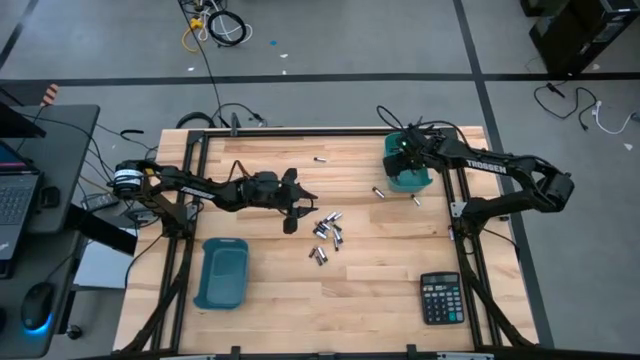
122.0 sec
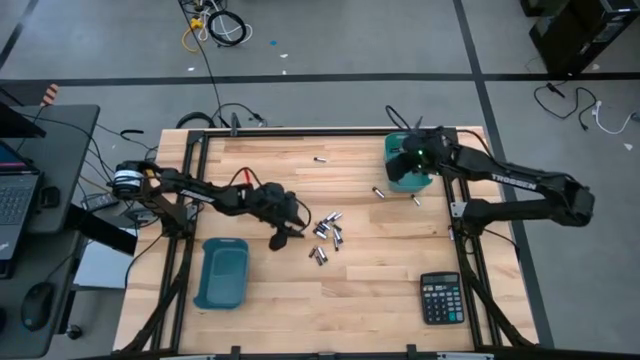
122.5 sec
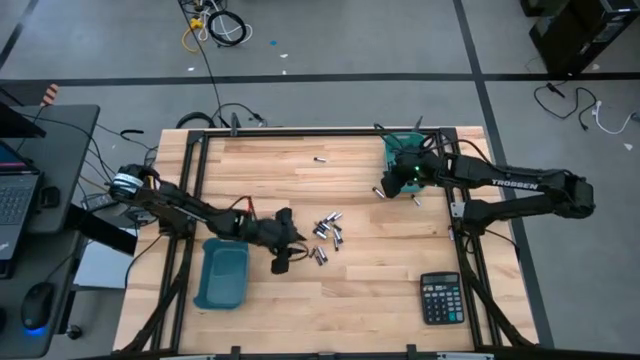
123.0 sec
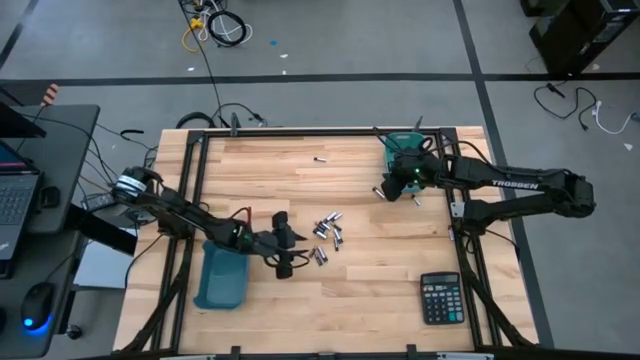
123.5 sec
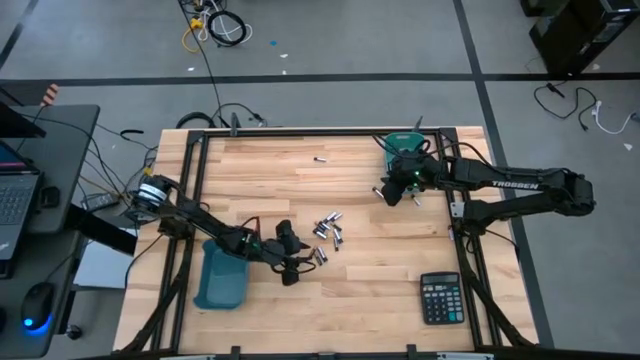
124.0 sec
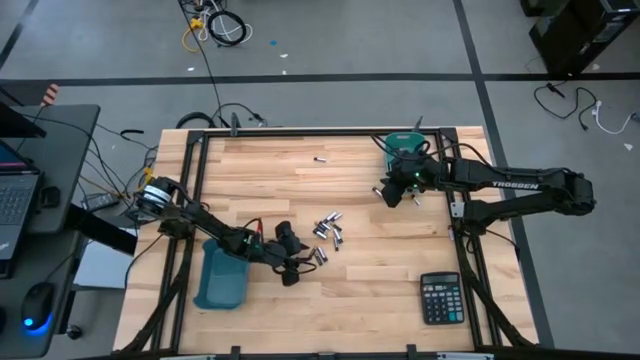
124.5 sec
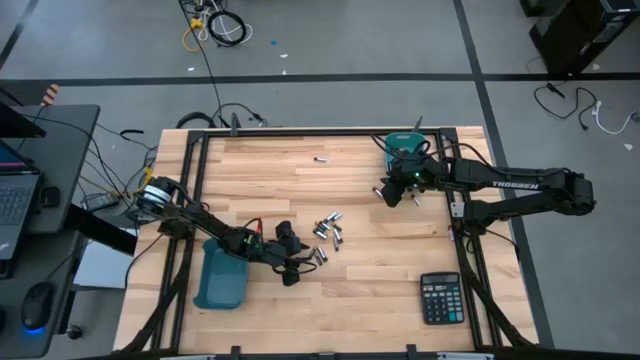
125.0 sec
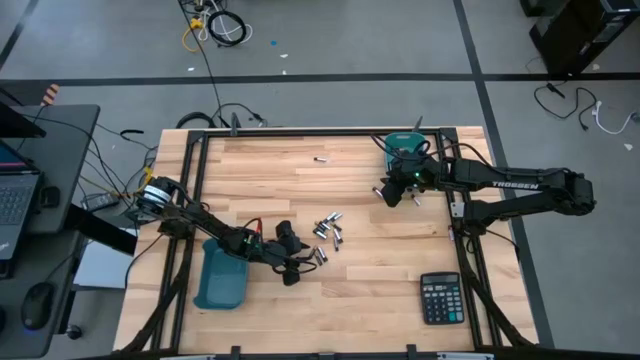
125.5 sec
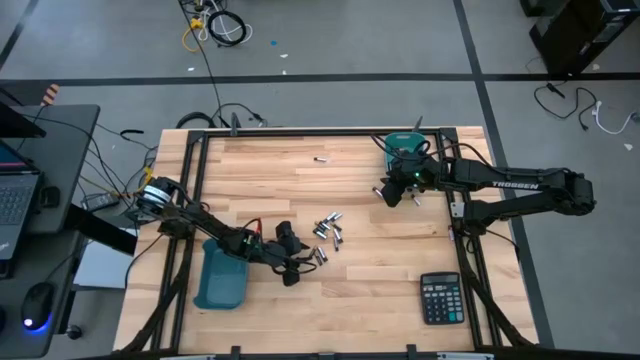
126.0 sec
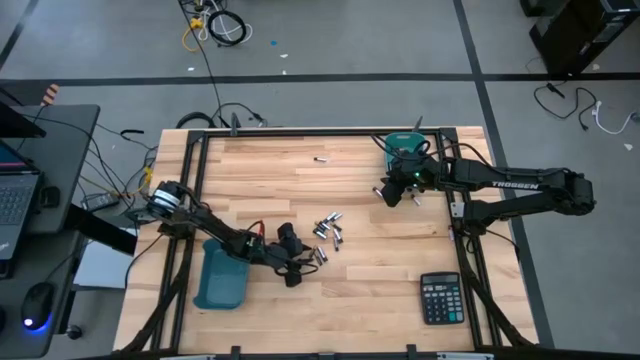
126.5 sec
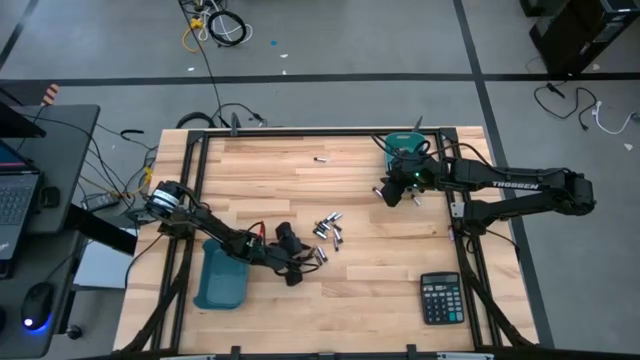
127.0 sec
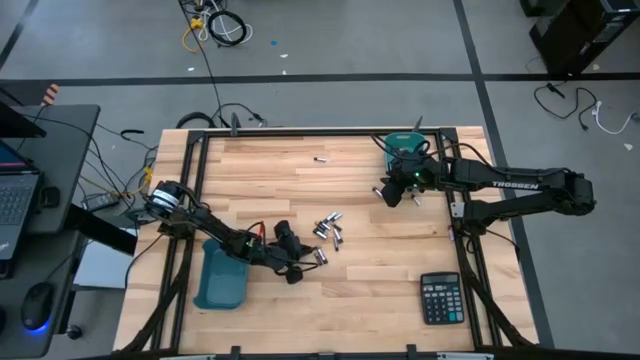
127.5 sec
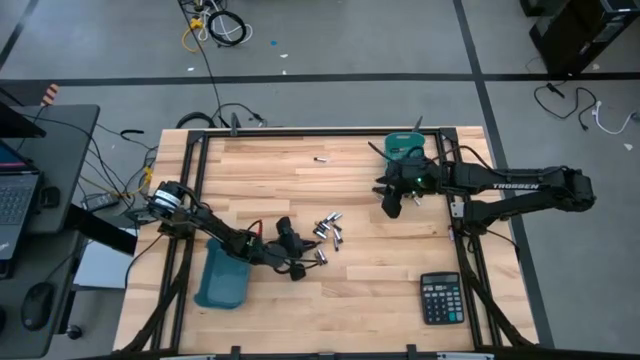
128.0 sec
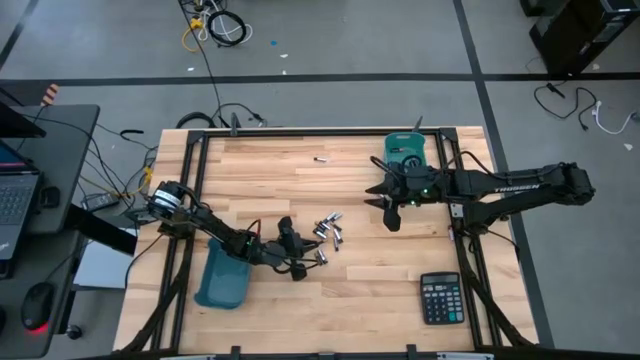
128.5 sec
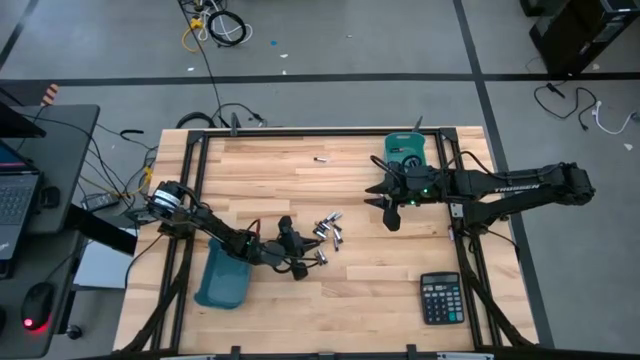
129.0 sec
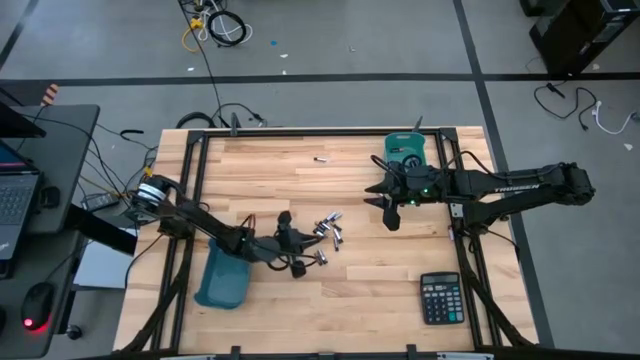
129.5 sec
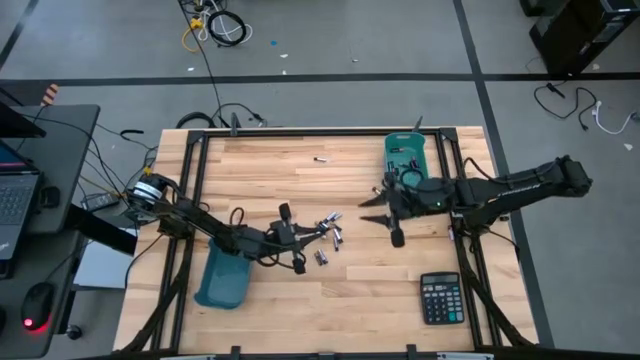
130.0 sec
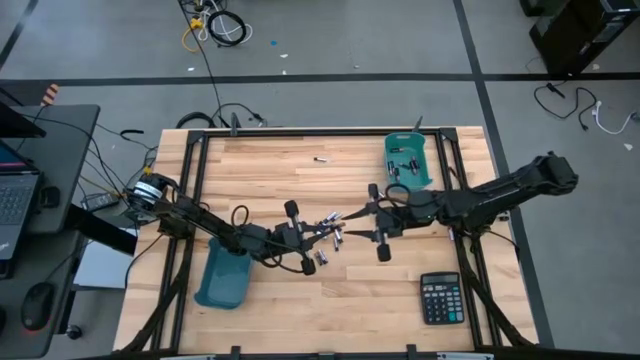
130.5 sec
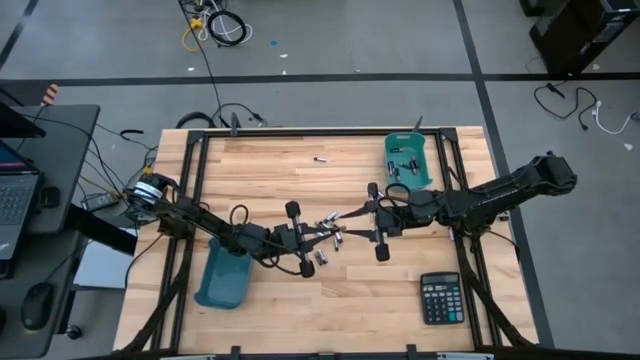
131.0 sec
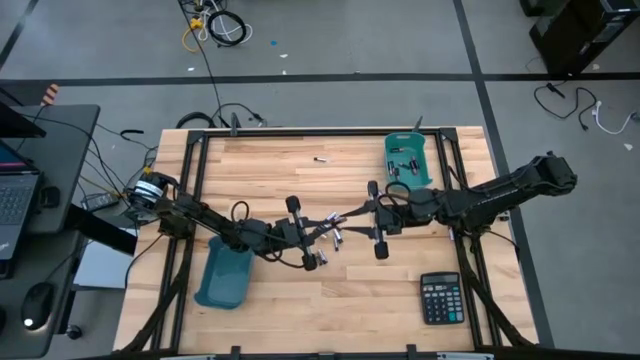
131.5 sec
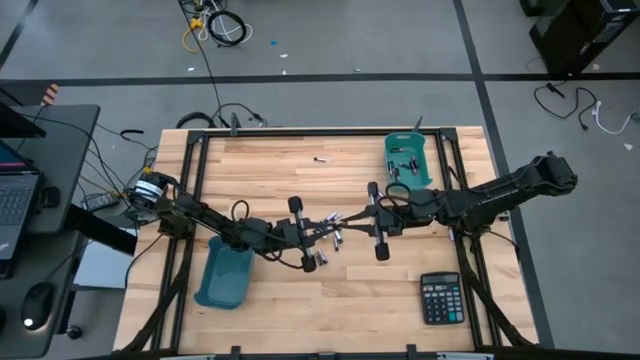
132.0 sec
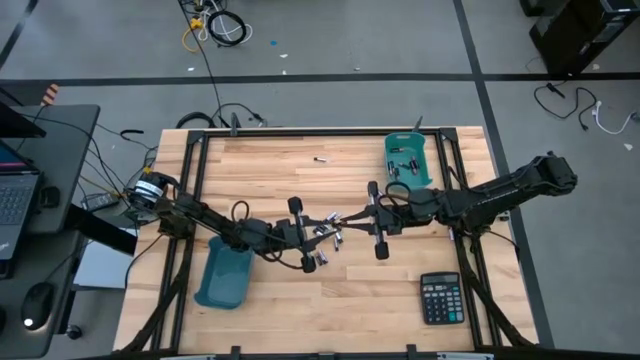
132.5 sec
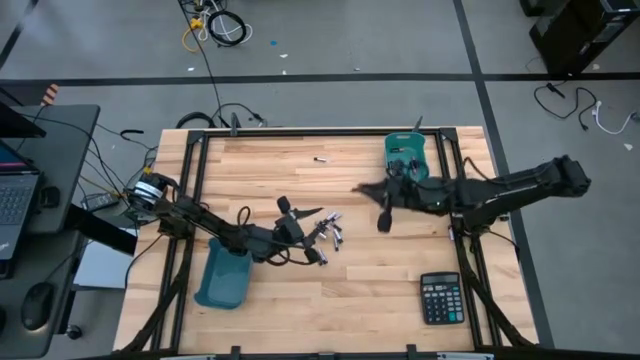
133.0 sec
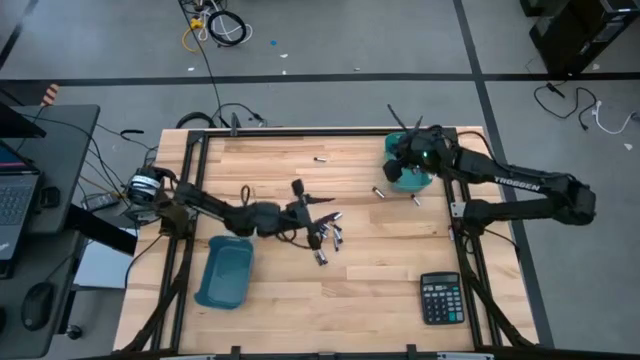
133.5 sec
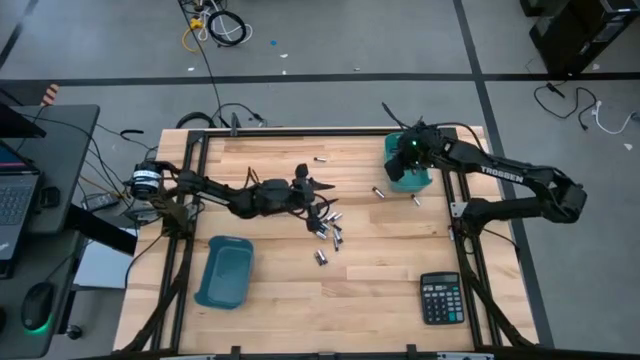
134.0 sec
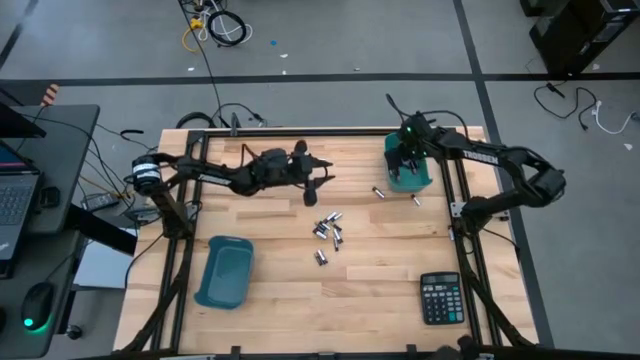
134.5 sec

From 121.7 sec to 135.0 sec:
Task: Sort batteries
Put the black battery into the green bin

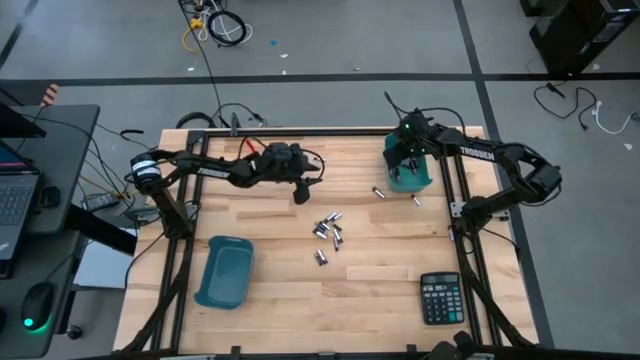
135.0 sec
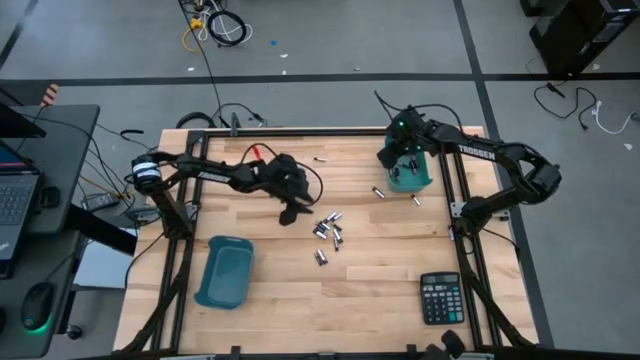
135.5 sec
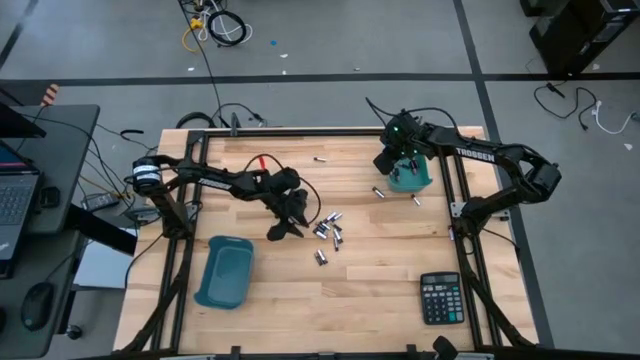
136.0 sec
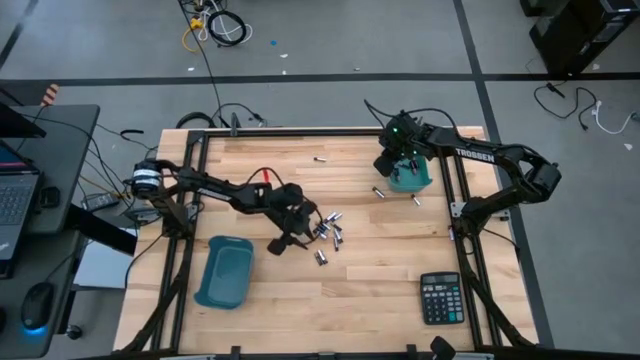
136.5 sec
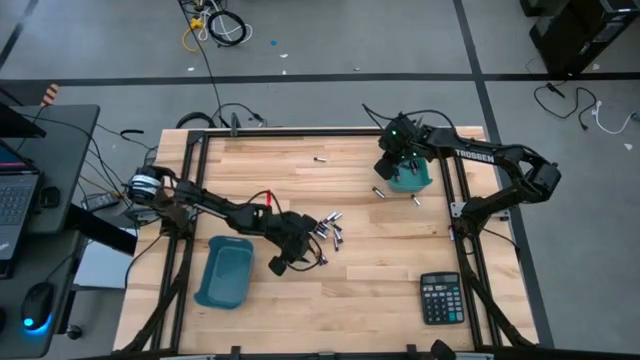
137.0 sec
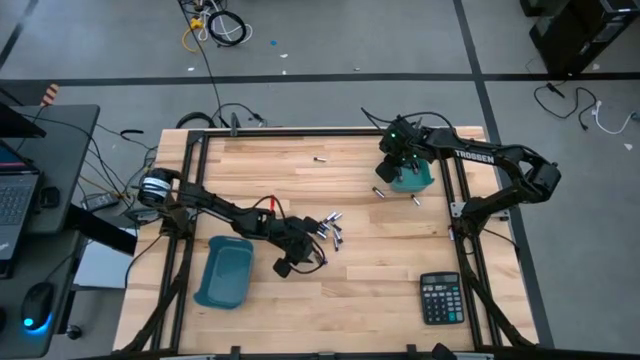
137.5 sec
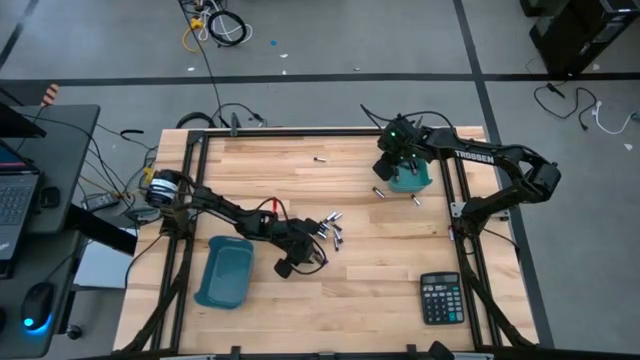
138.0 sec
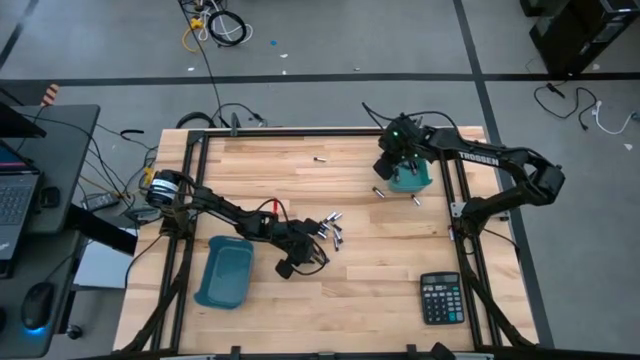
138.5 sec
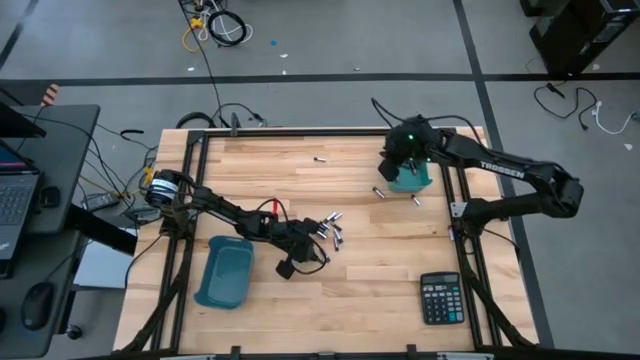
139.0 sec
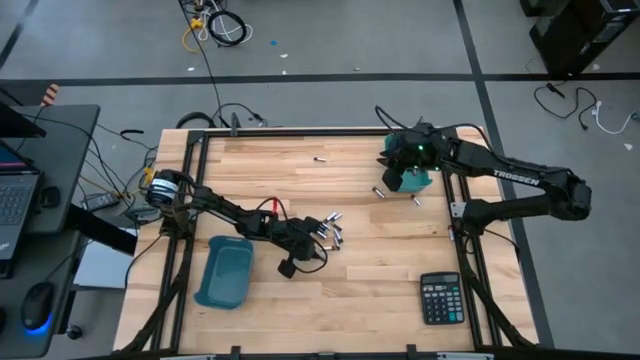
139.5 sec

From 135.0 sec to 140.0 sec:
Put the black battery into the green bin

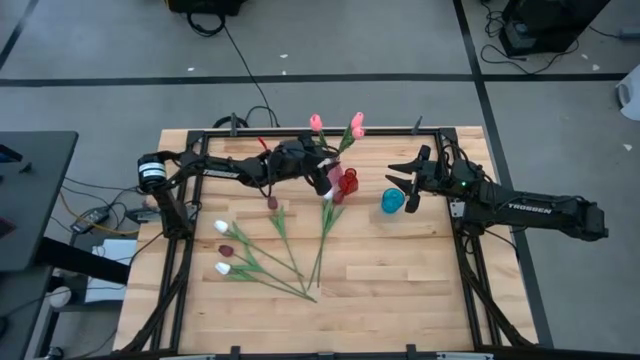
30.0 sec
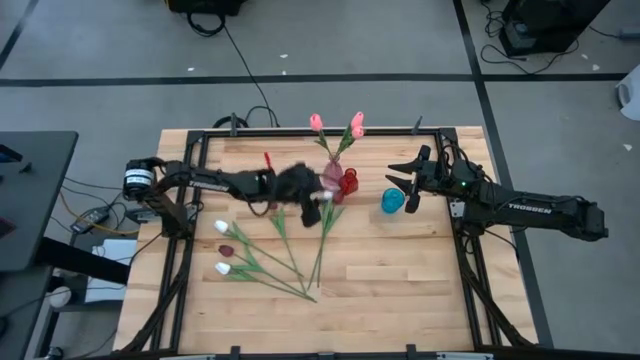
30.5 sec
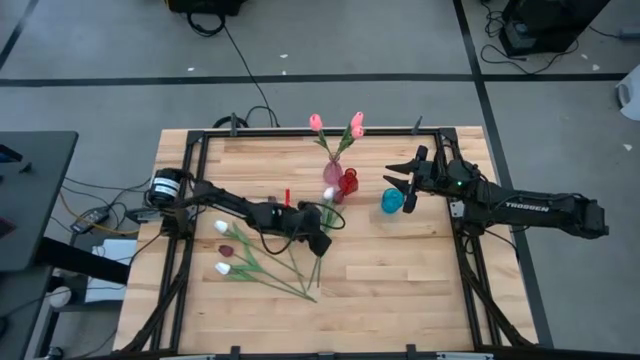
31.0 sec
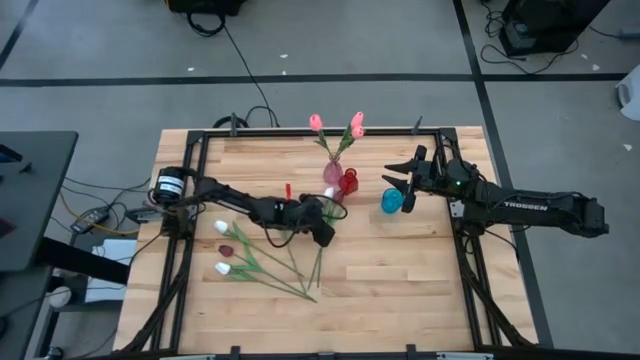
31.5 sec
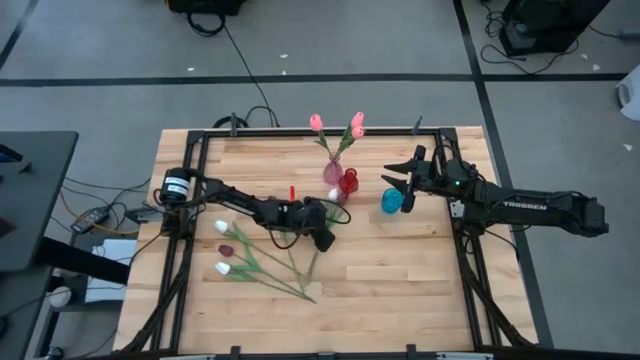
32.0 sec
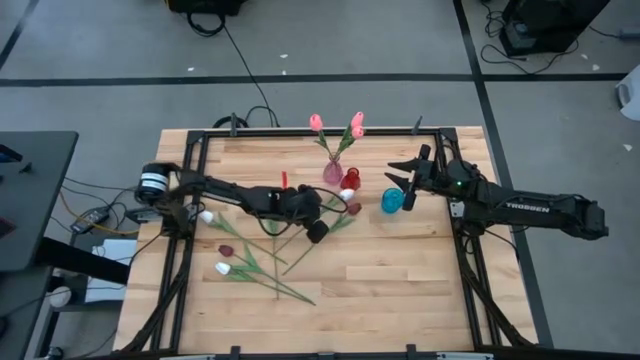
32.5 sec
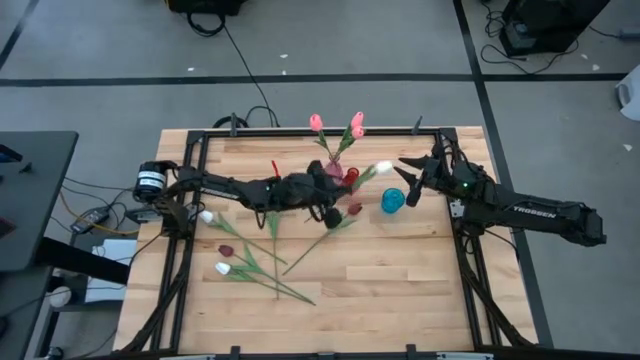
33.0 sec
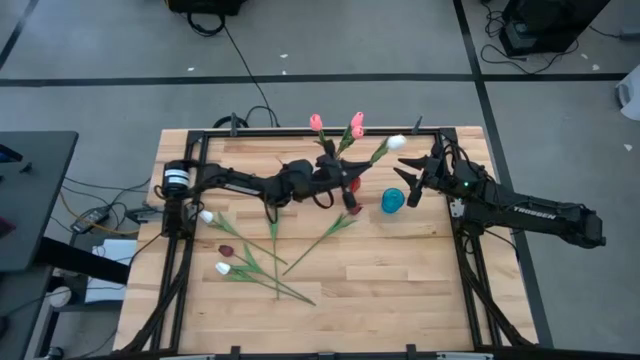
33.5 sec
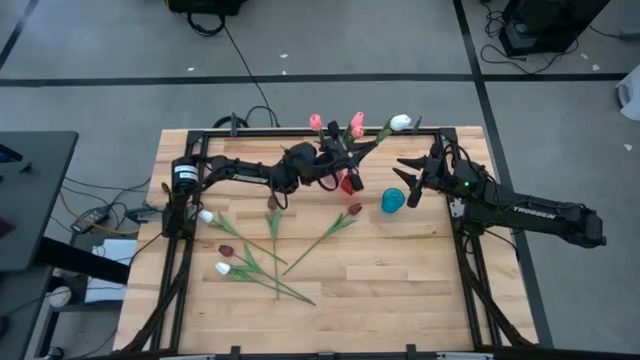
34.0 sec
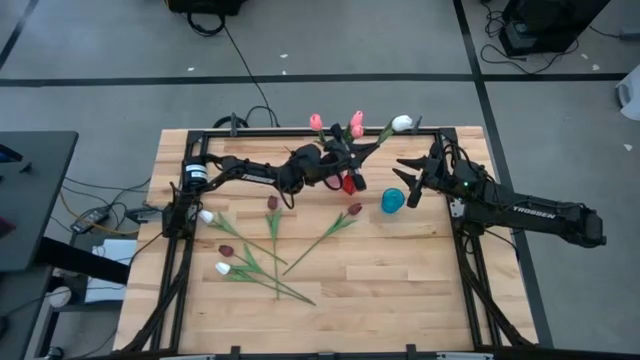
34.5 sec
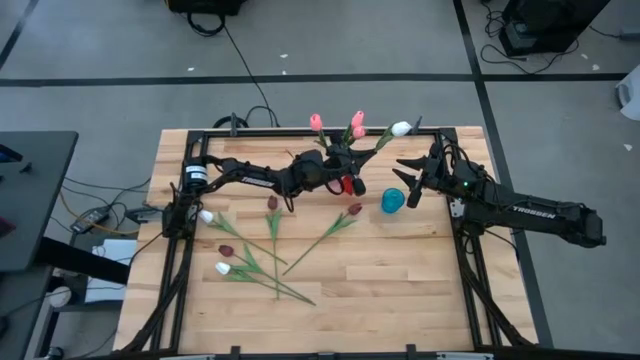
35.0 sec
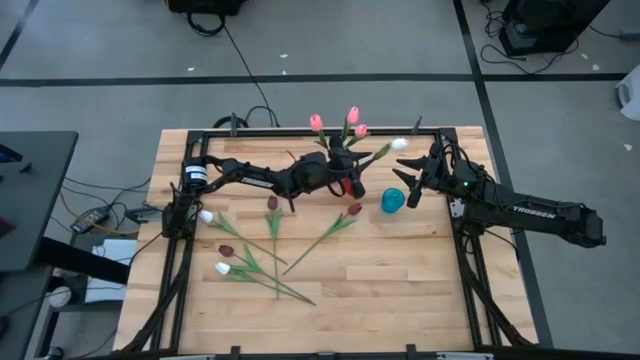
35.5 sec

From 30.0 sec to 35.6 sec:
Task: Sort flowers into vase by color
Put the top white flower into the red vase
